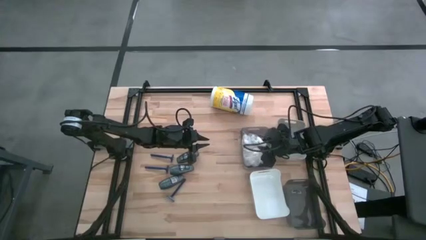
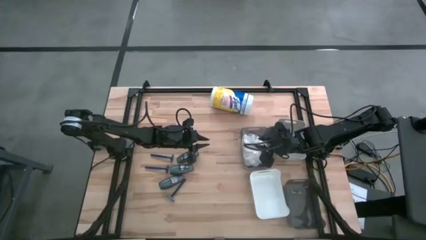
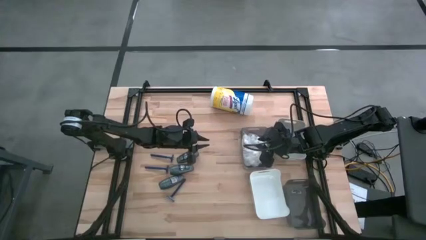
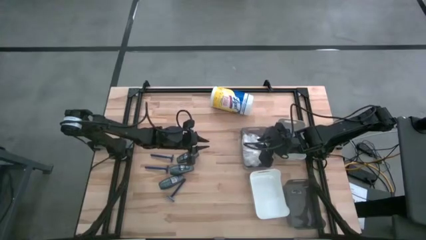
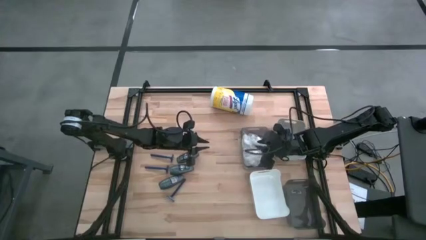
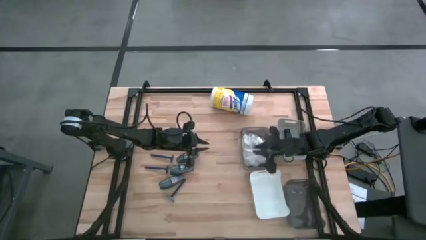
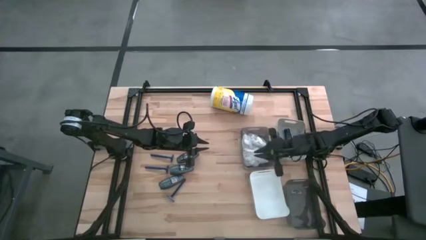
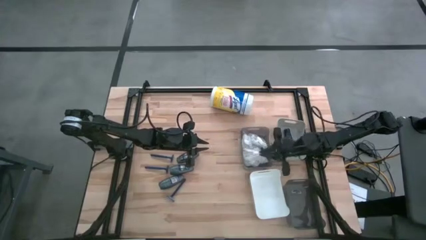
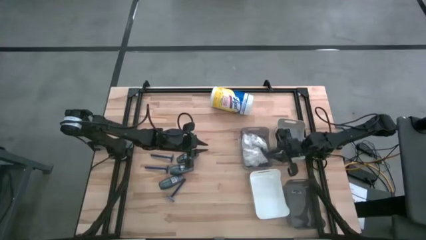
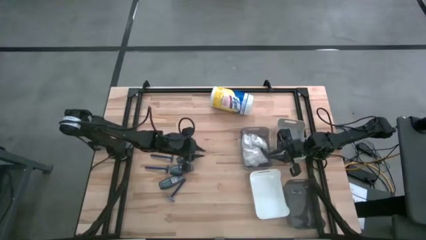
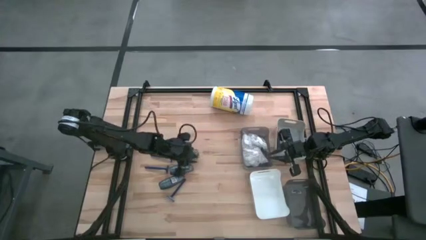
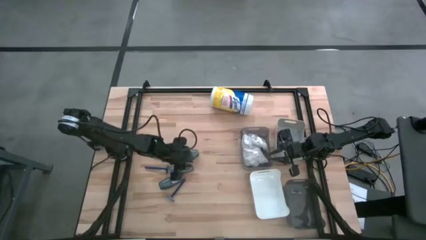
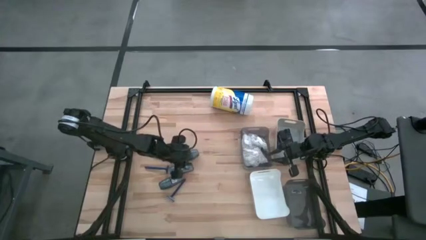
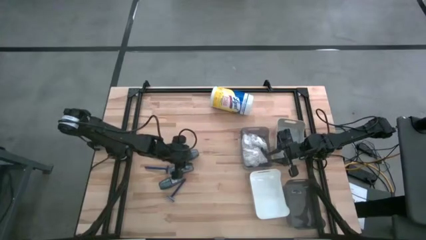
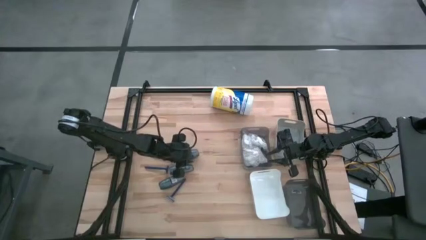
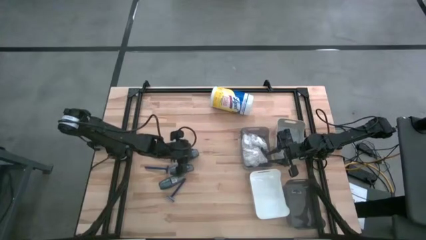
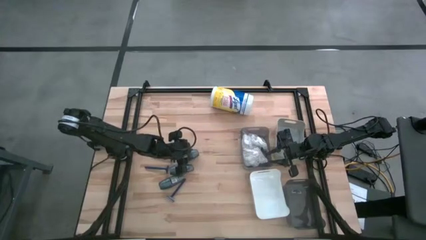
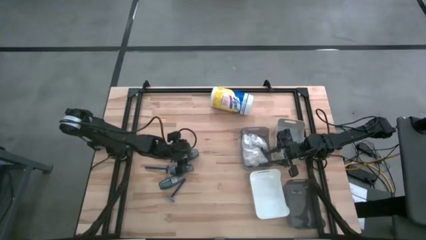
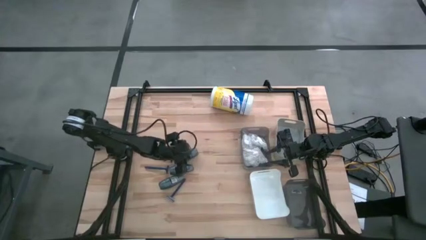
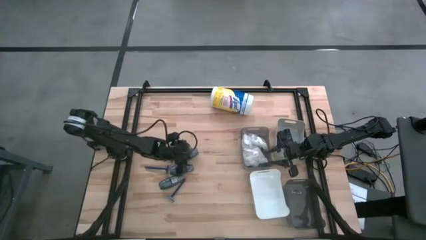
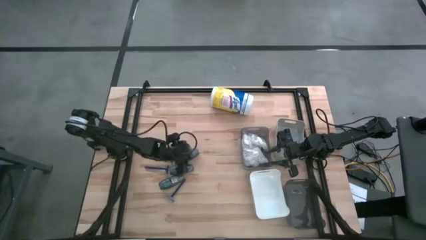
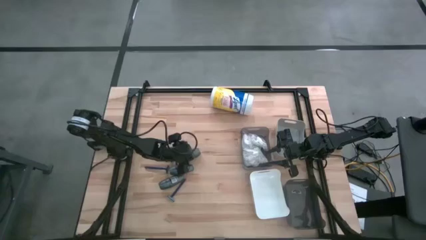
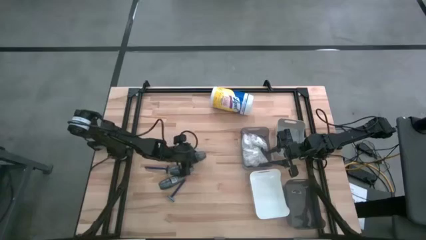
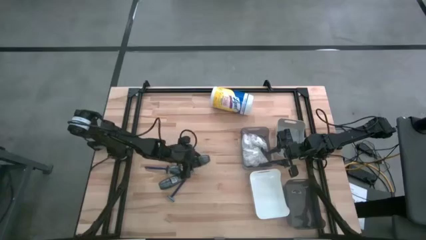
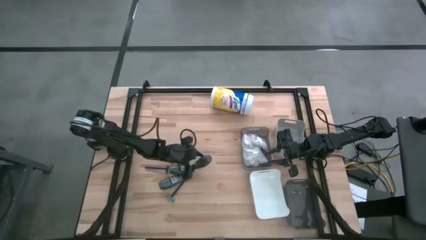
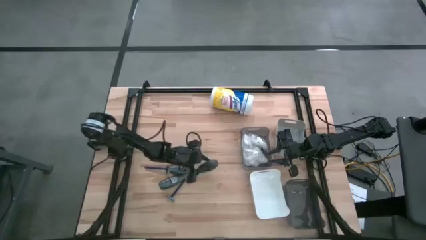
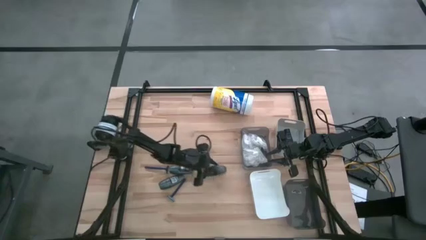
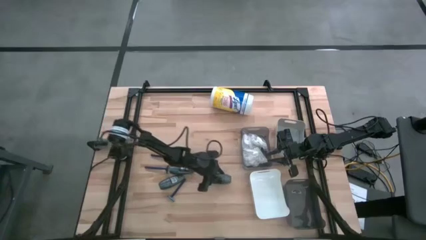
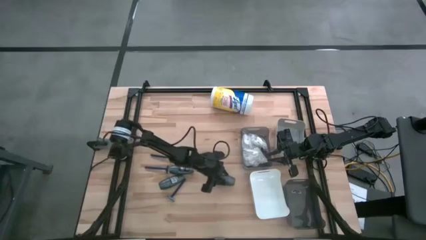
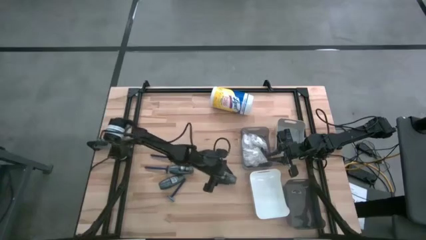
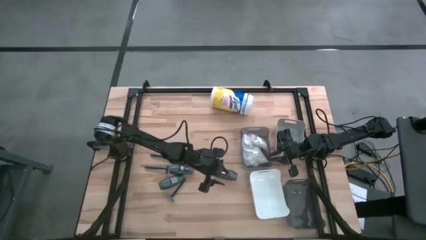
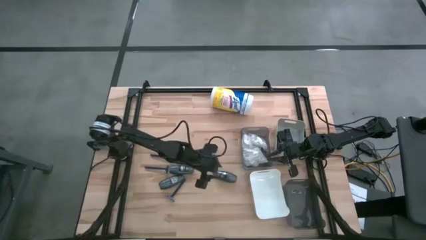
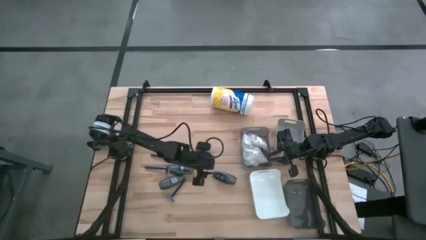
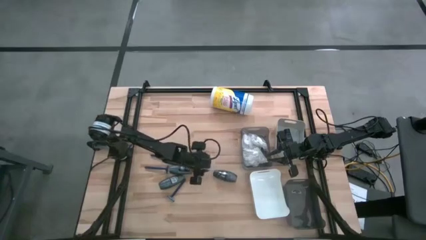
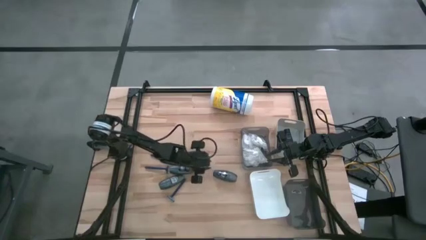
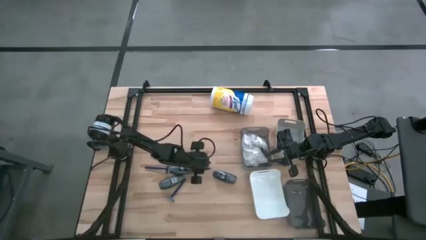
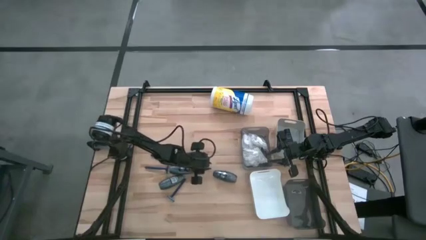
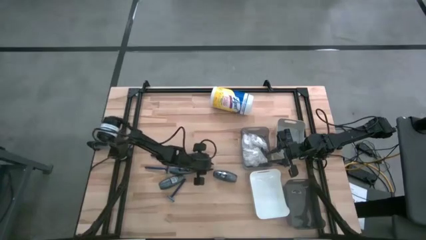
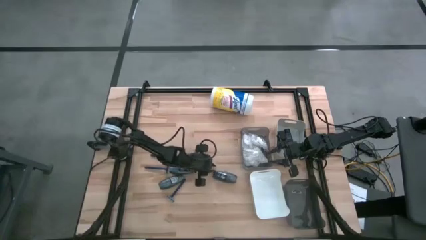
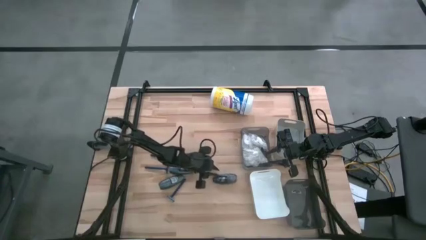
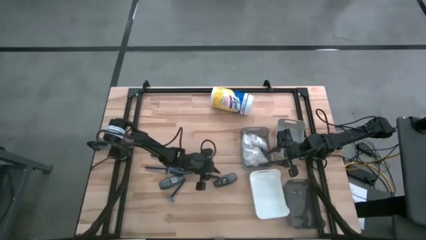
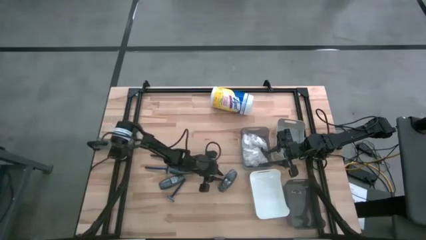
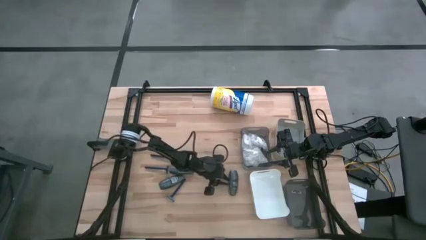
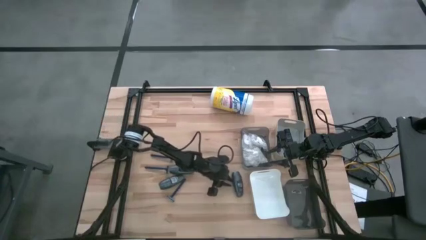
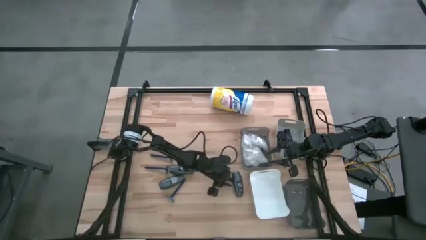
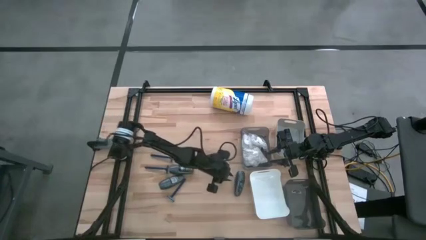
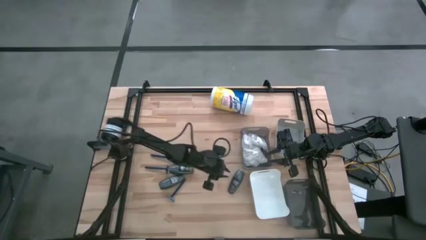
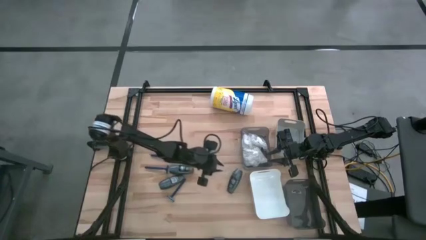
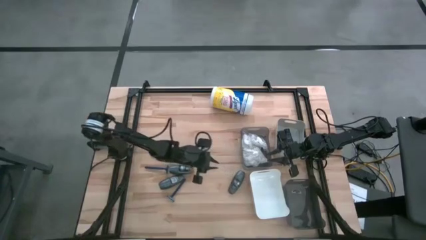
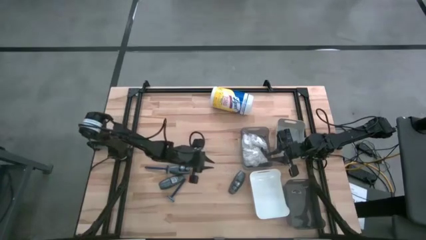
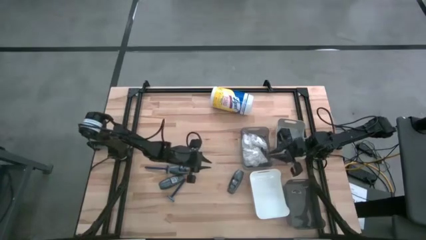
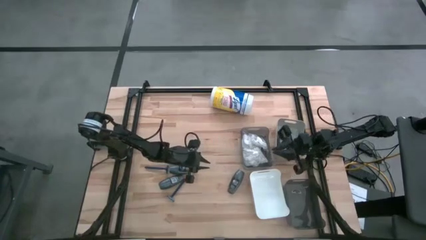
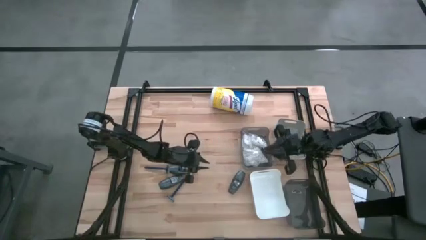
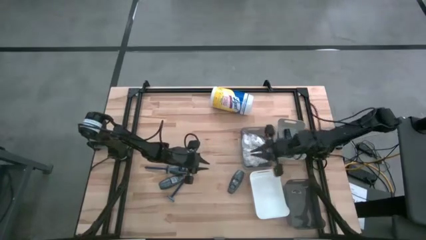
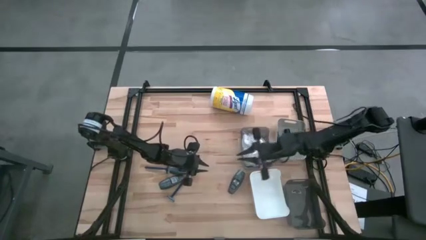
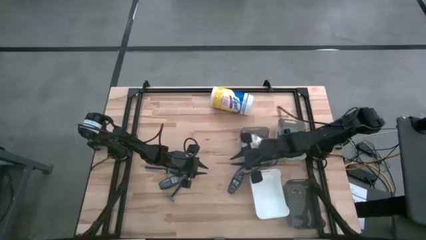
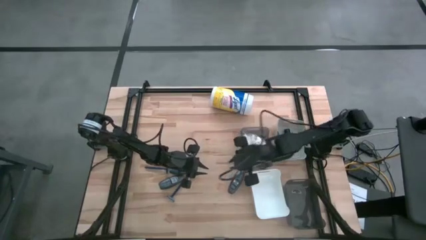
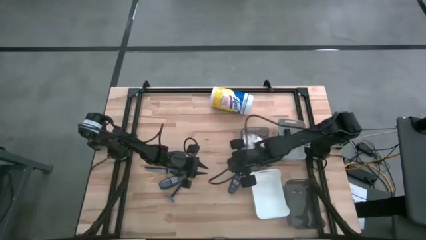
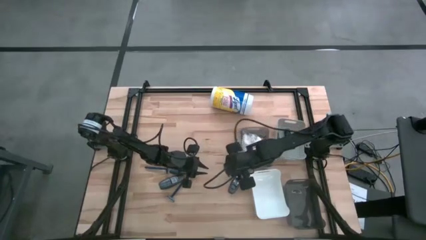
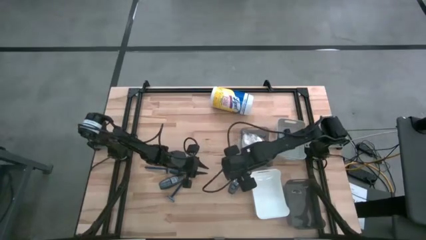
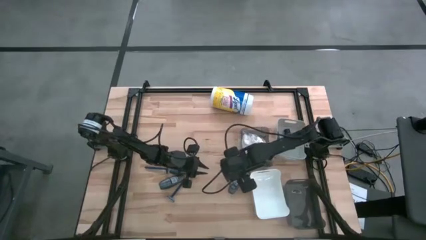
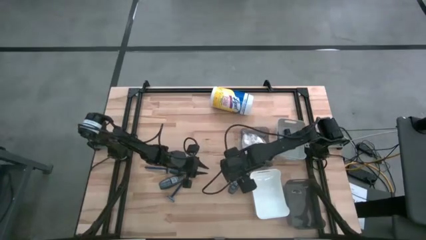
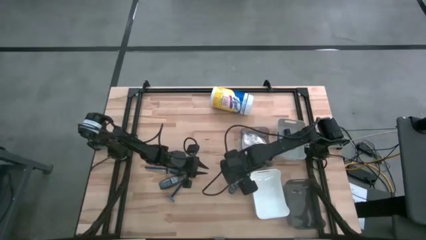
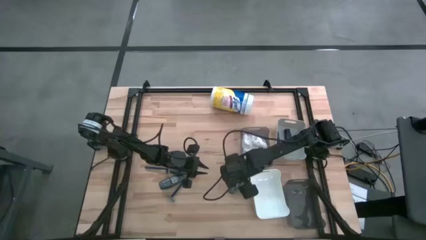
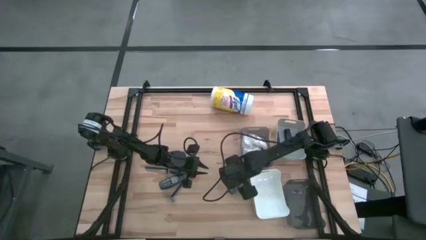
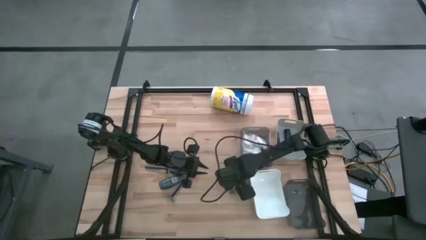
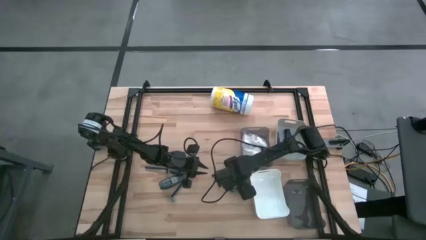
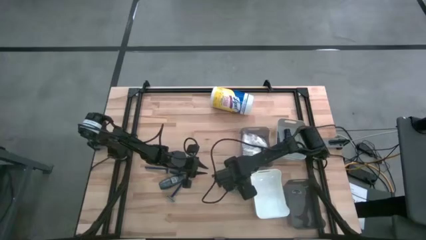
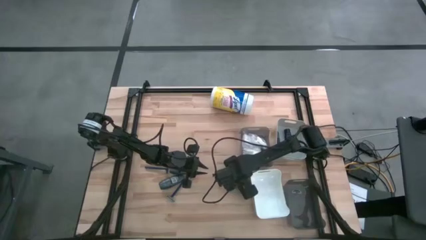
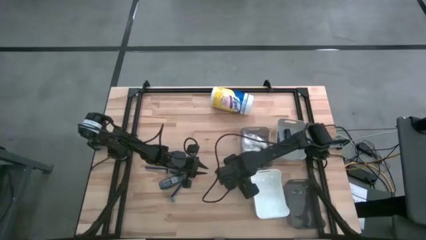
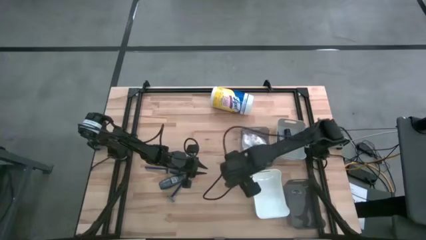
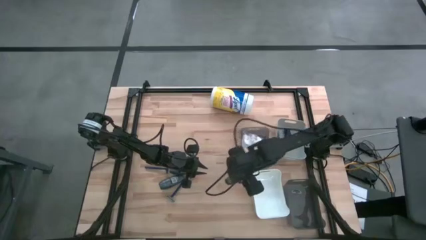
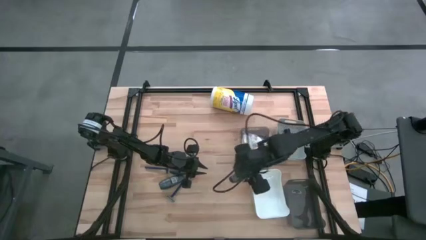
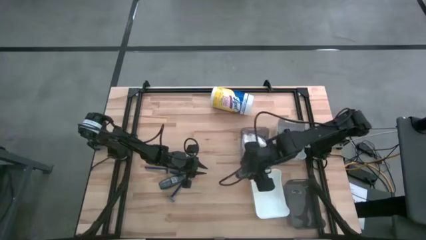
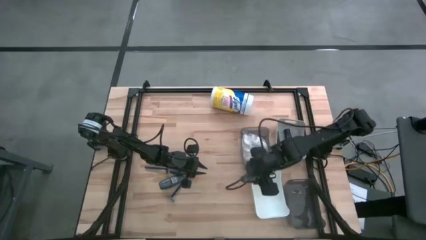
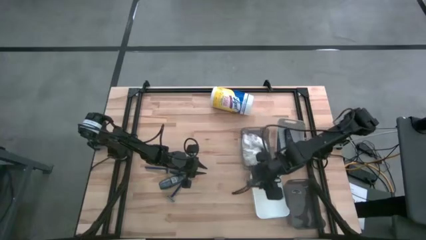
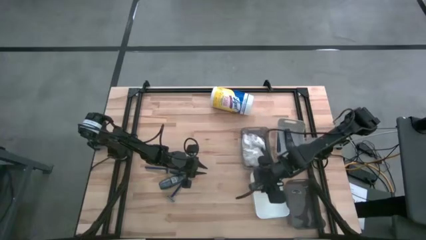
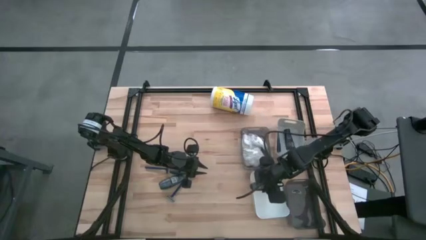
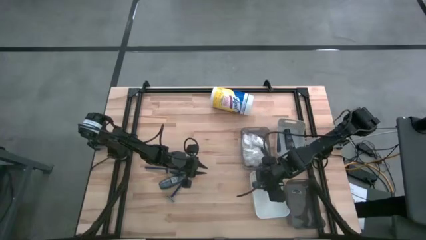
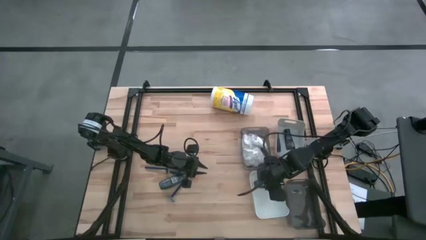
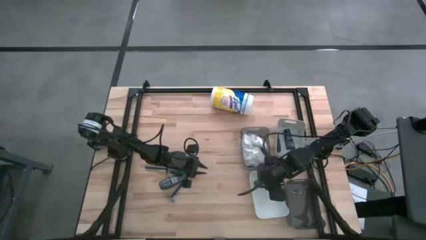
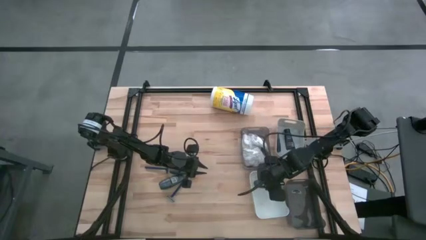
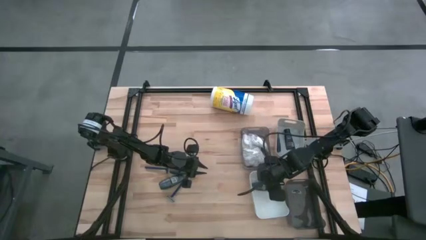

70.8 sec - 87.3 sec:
Task: Pick & Place Travel size toiletries
Put the top deodorant into the white bin
